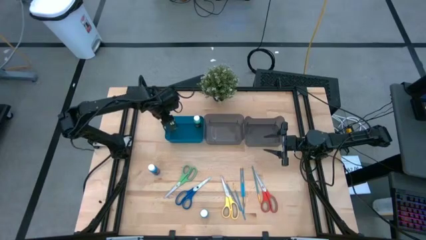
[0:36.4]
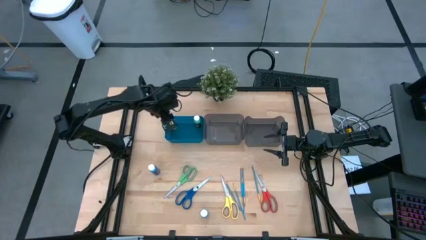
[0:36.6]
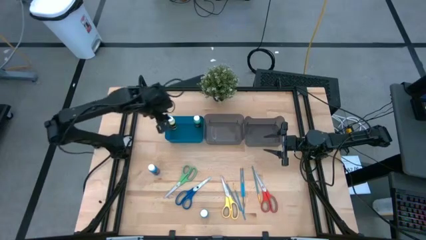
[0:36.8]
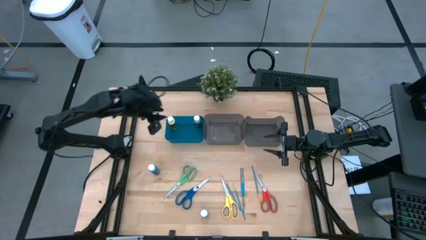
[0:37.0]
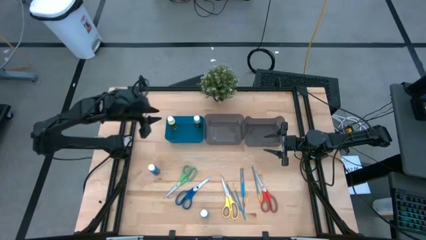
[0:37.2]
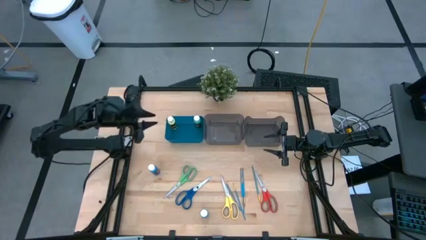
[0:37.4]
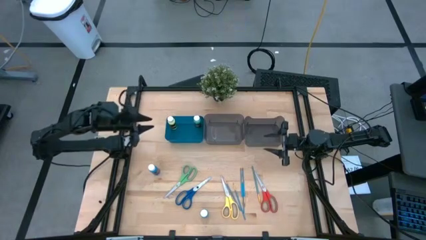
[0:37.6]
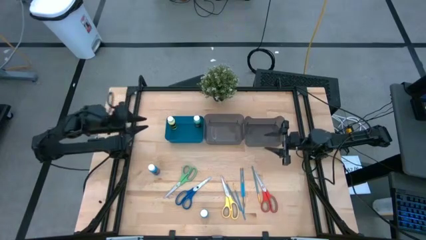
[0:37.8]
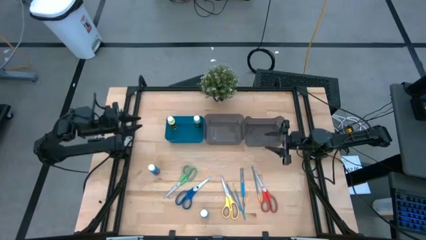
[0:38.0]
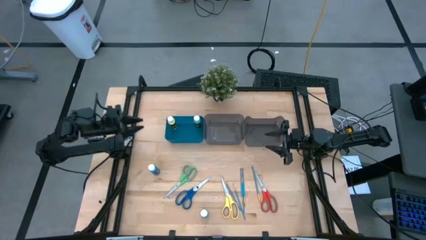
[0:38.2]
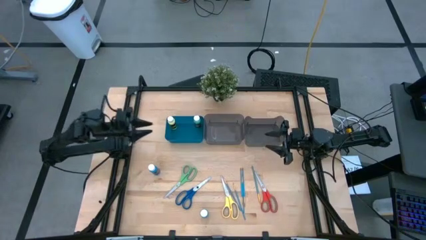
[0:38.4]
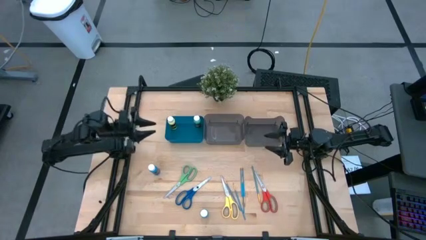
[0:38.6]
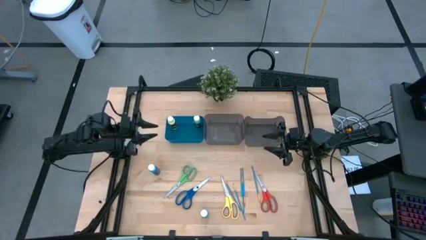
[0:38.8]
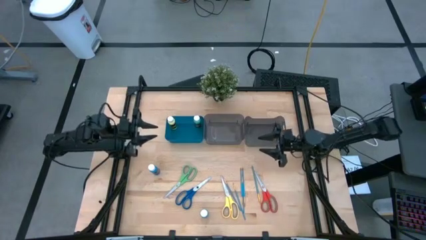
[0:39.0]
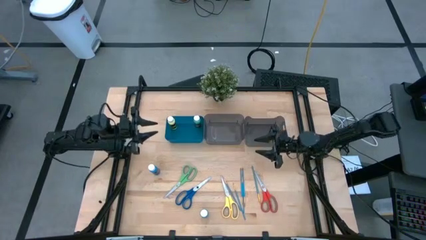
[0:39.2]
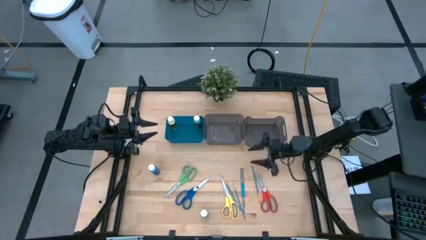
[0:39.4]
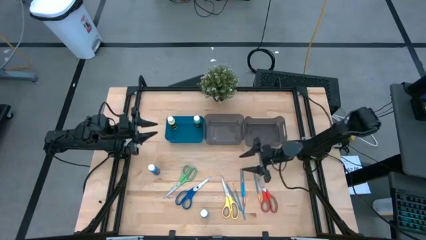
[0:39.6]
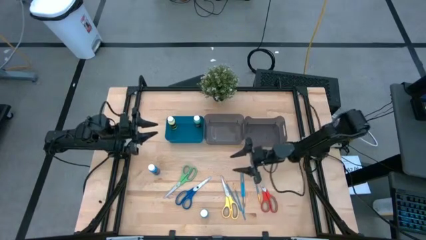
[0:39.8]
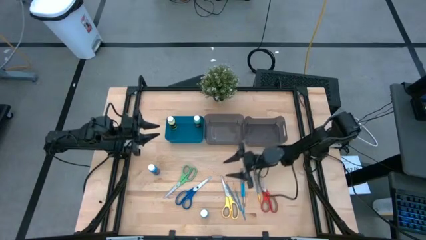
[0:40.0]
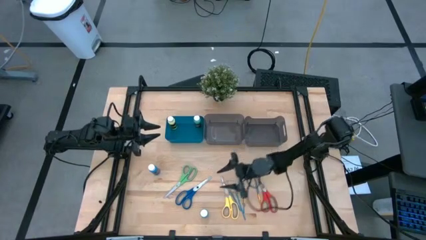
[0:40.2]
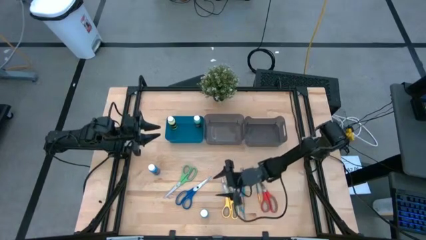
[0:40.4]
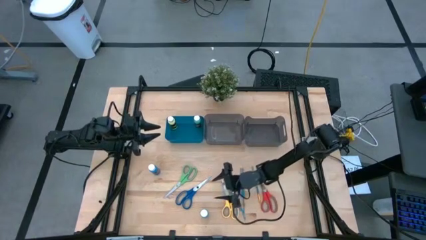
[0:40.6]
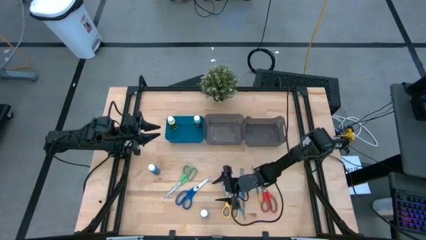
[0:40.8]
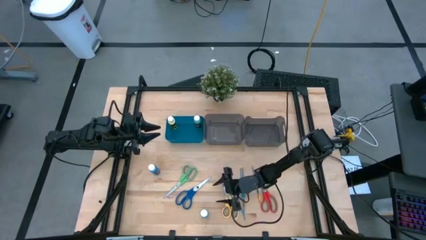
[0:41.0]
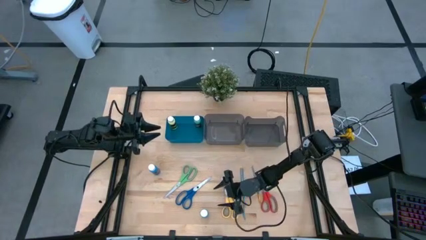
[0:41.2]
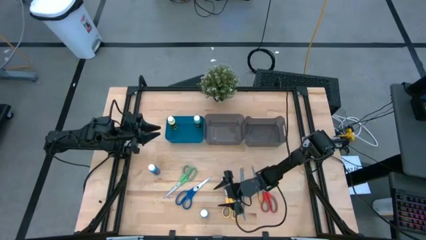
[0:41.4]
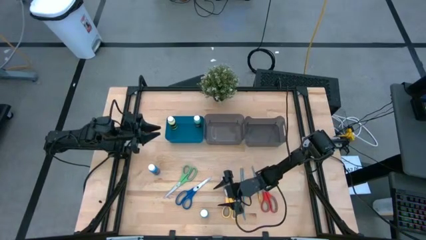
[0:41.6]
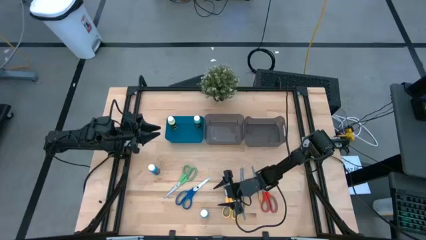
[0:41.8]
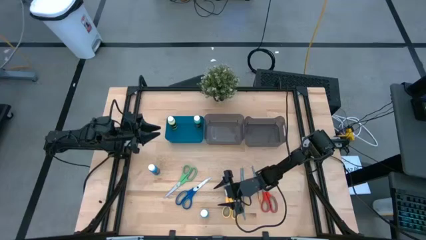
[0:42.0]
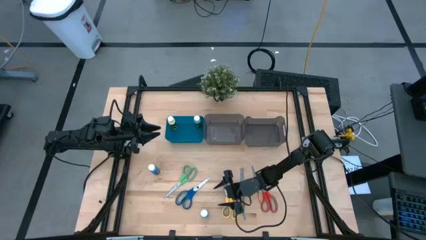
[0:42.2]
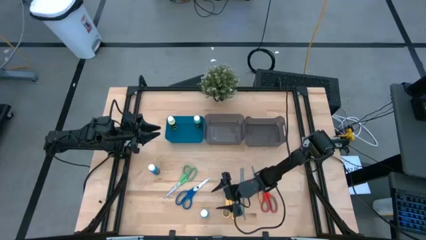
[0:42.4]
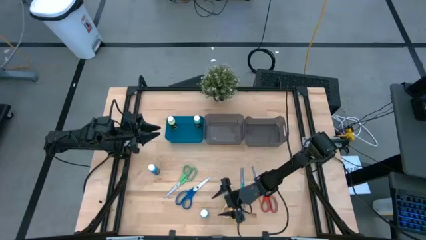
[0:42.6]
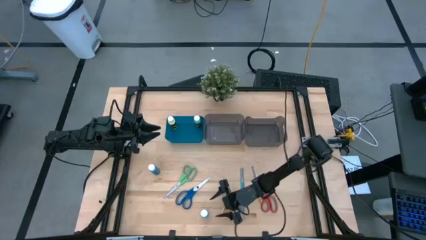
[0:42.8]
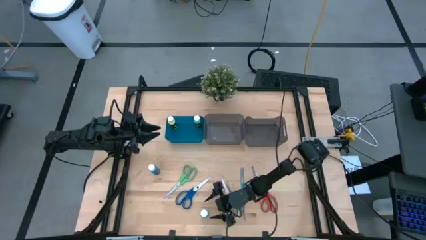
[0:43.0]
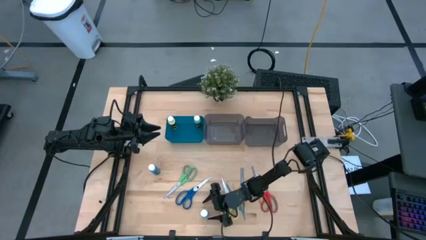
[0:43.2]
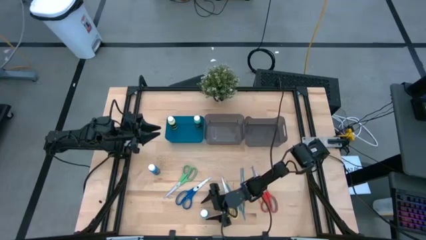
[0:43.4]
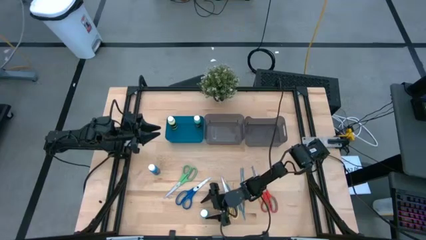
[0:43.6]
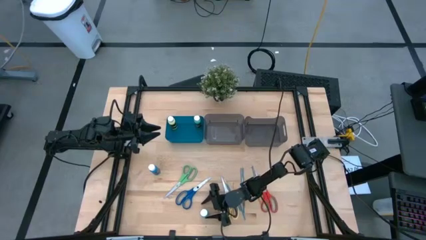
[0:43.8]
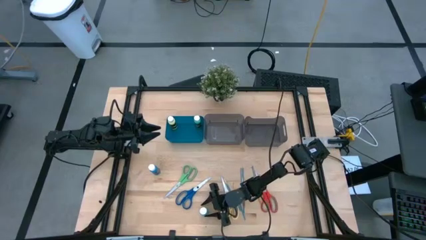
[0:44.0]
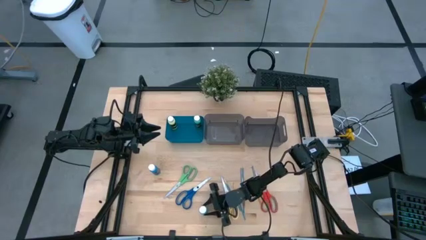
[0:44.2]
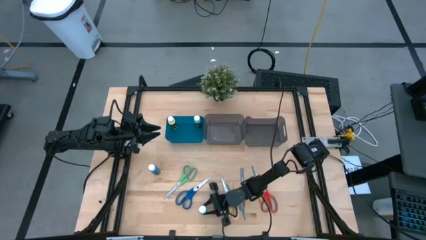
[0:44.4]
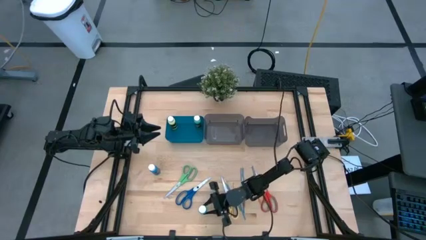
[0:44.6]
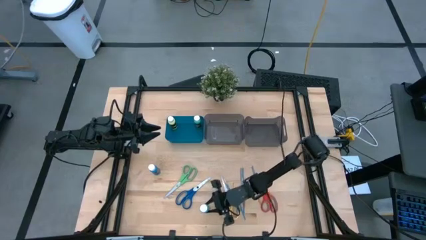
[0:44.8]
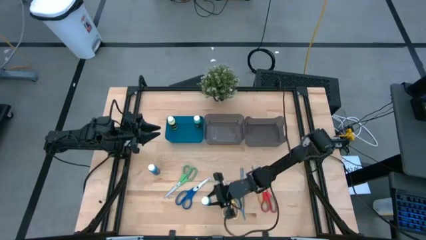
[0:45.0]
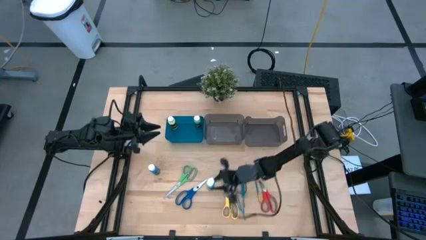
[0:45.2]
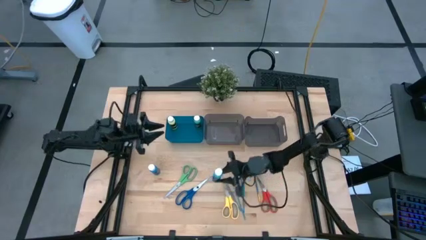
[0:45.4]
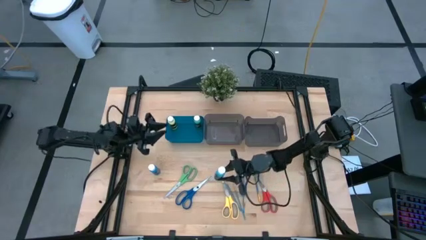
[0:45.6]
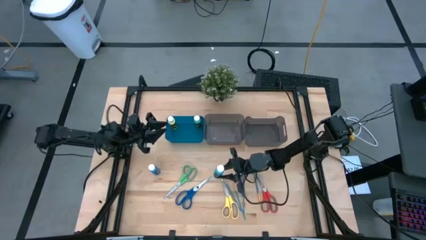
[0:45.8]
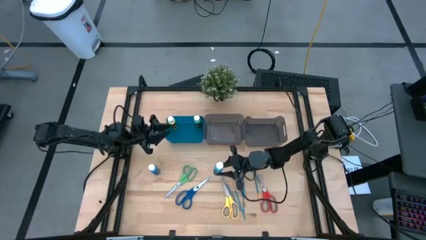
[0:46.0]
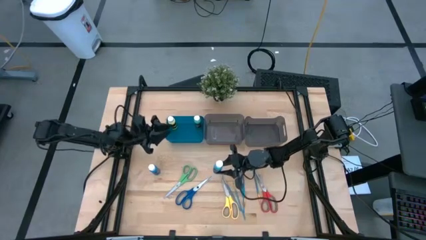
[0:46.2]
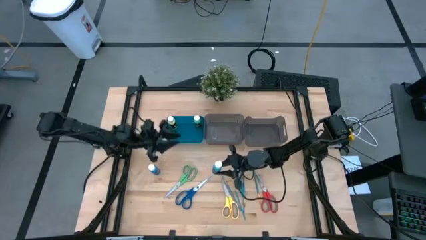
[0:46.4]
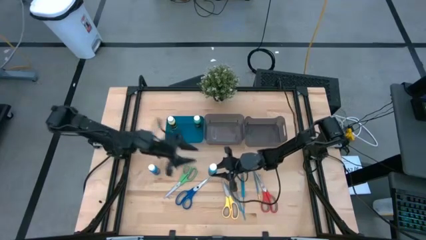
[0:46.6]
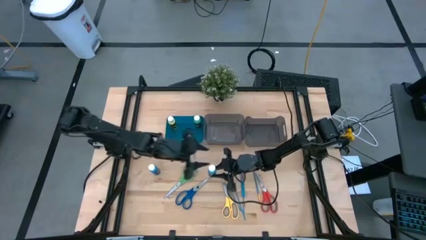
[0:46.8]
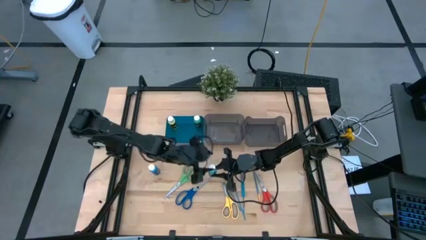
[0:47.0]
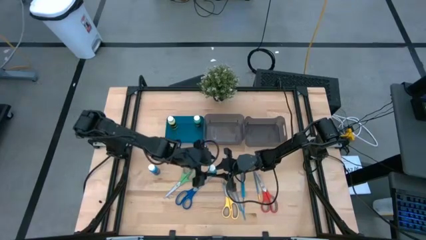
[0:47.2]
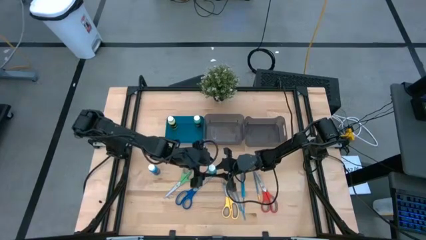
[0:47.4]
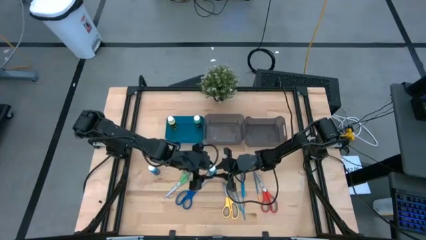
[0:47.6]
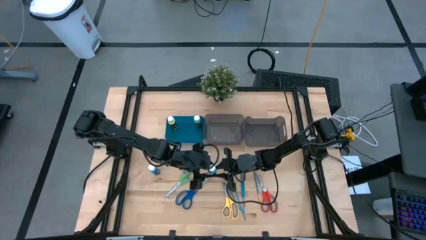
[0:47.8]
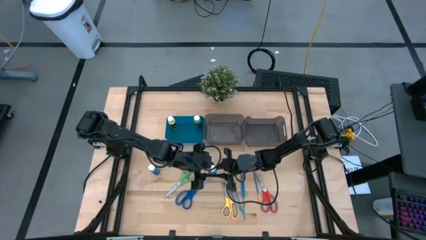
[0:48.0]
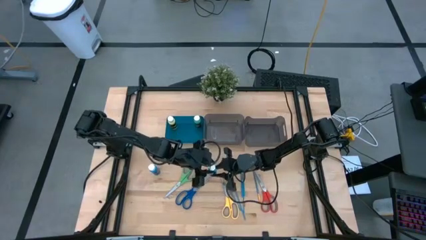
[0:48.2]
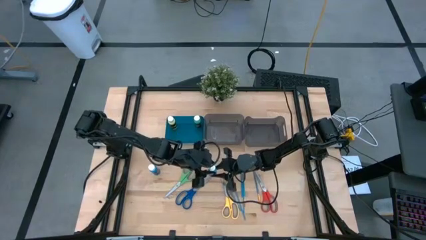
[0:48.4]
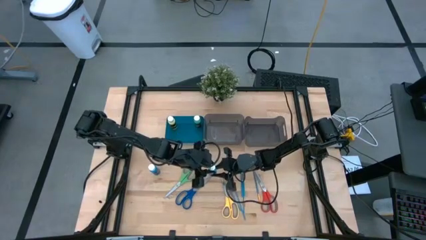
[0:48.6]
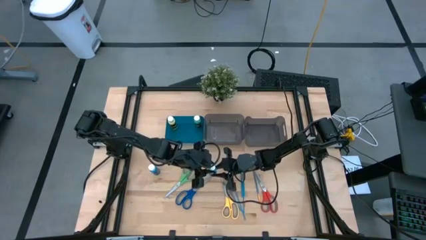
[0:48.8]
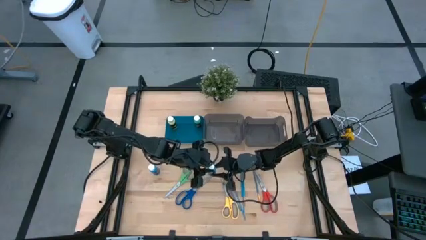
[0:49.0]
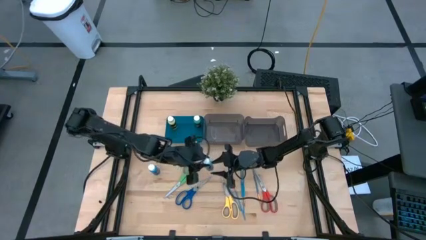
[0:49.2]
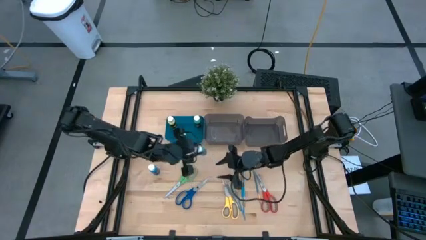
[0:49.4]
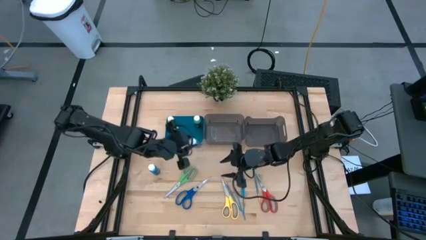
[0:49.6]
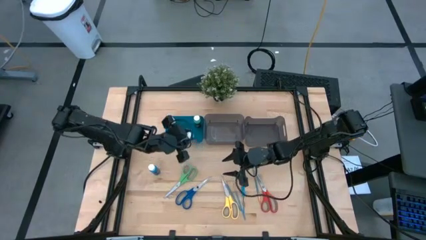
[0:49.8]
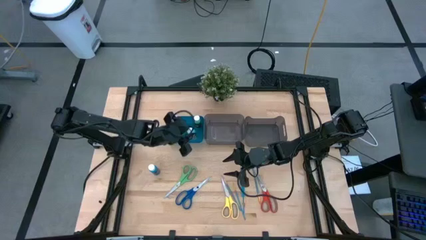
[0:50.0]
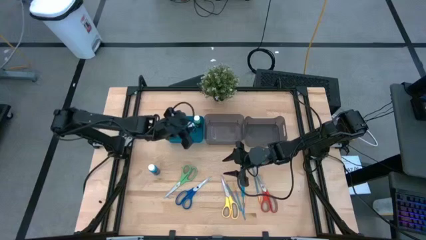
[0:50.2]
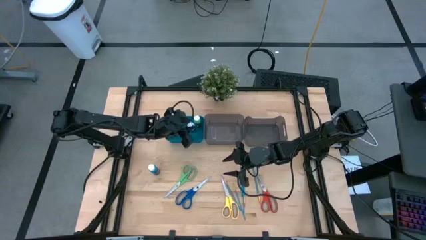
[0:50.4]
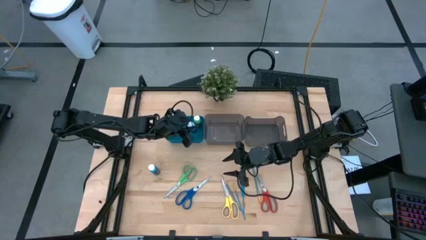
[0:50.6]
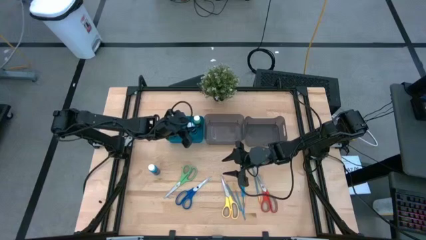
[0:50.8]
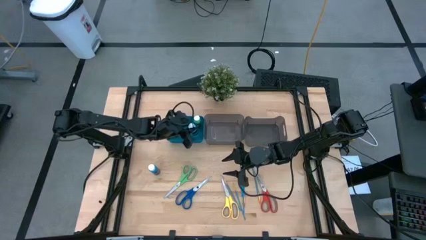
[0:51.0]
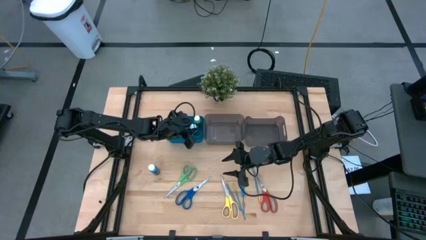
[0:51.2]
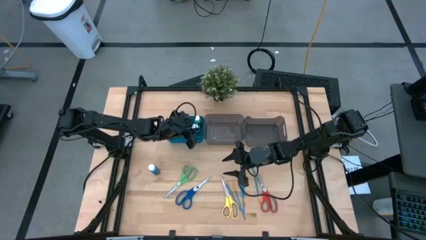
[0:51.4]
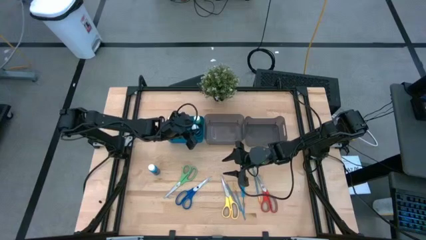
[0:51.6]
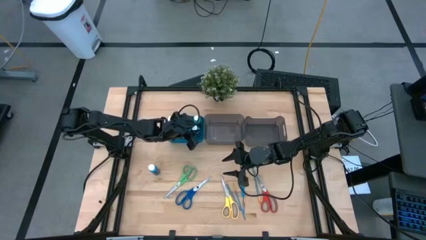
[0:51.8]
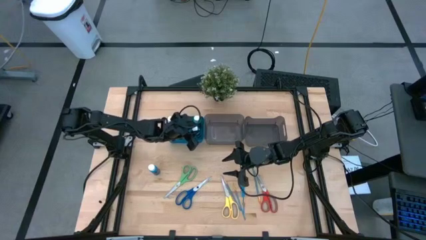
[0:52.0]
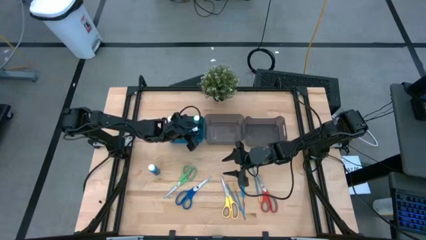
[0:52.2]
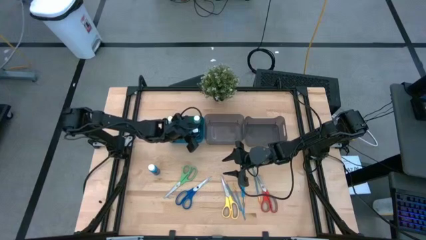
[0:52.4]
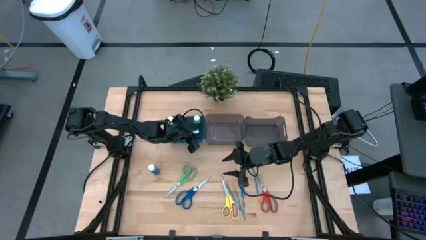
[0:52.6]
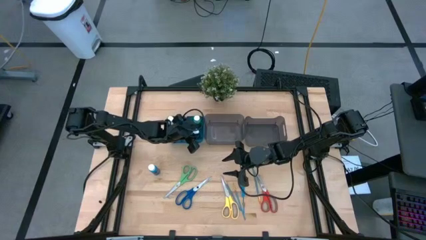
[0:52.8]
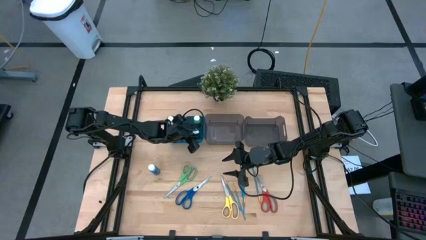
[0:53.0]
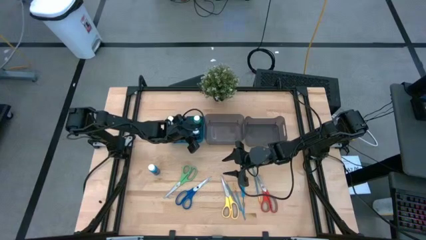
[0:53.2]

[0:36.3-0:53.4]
Task: Pick & Place Paint Supplies
Put the bottom blue paint bottle into the blue bin
